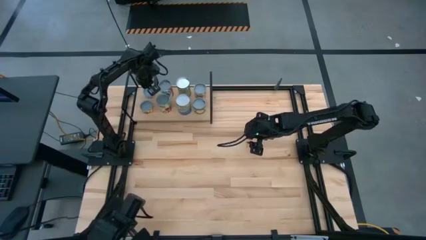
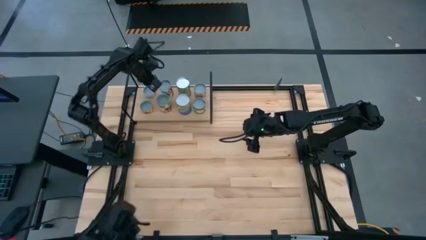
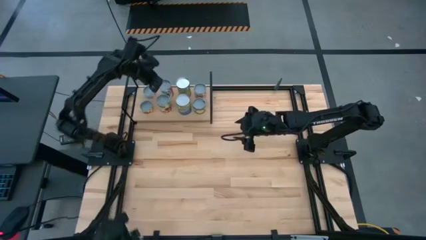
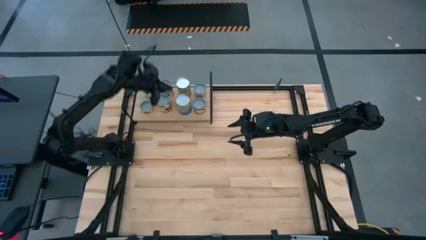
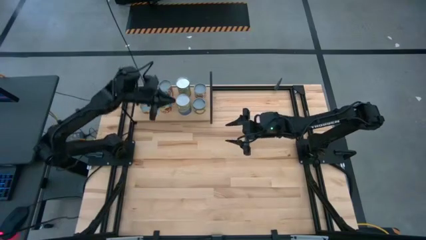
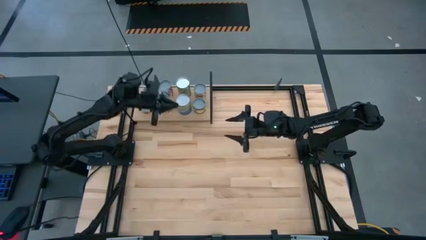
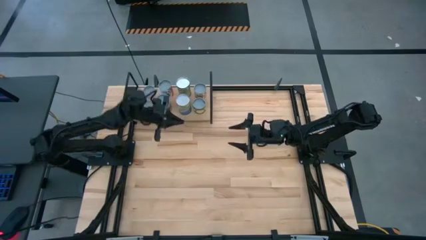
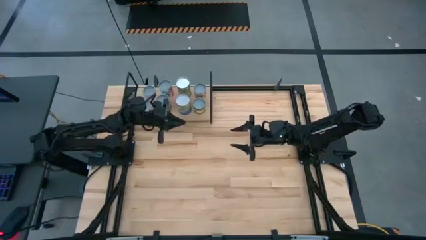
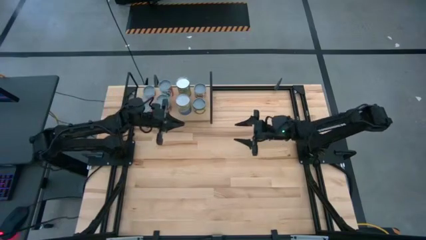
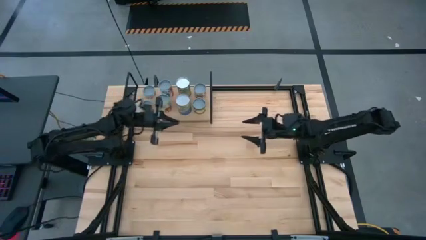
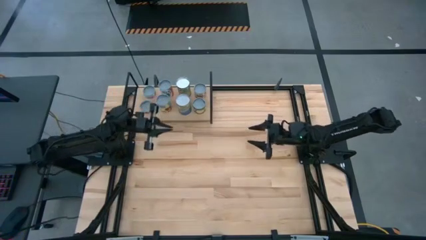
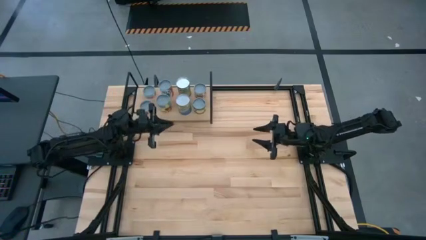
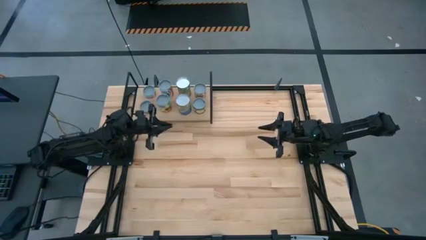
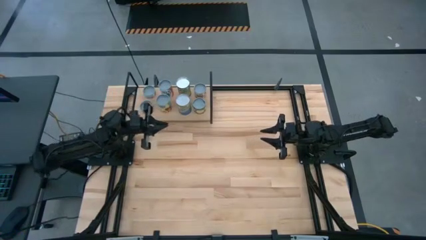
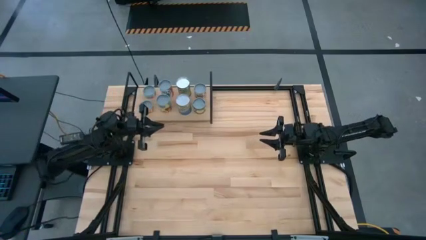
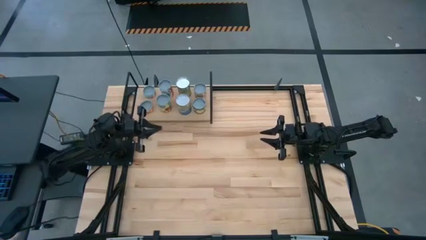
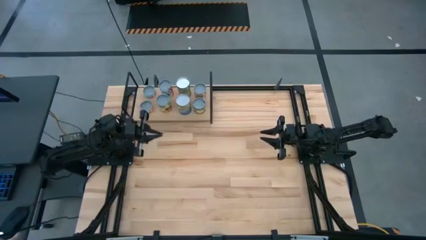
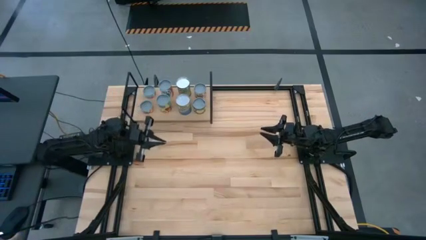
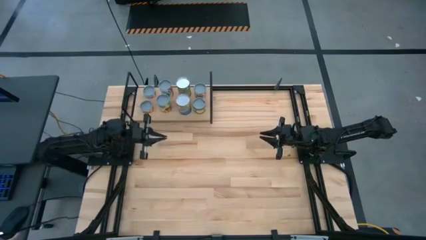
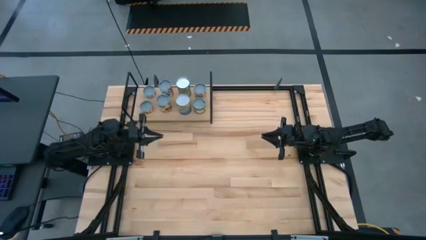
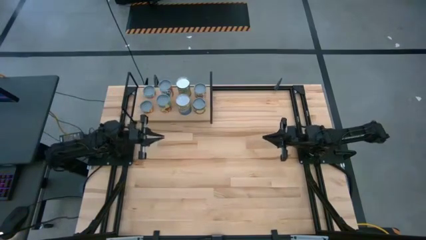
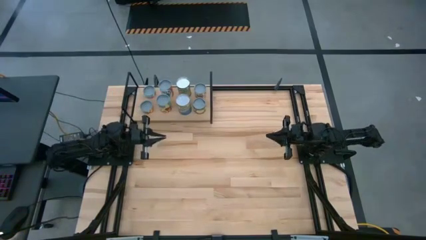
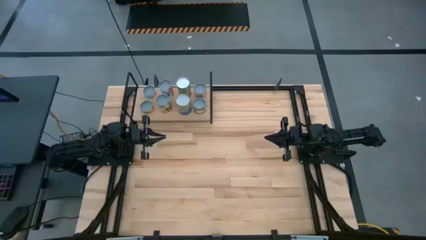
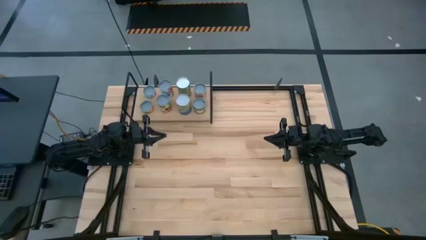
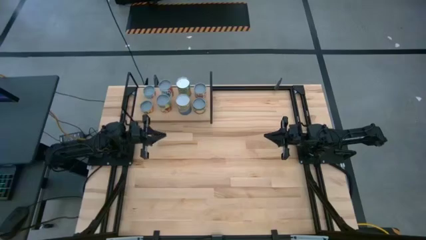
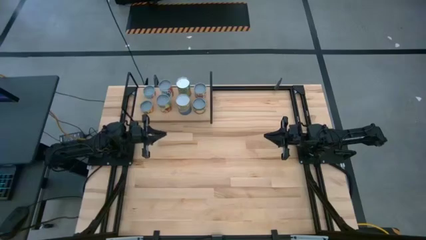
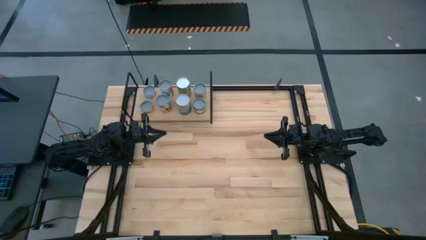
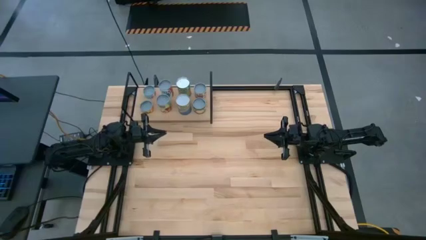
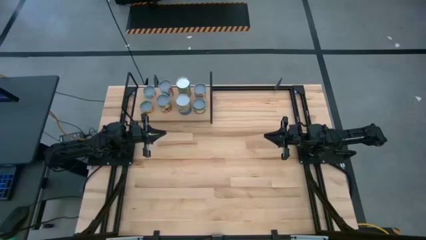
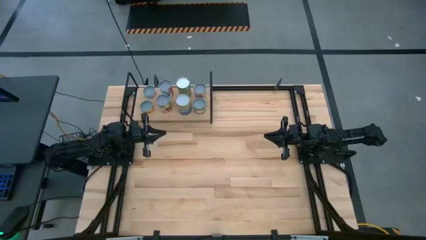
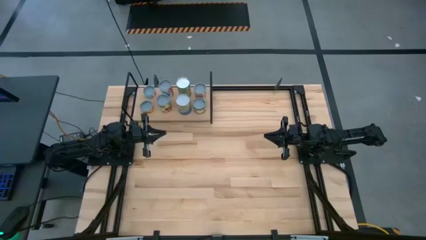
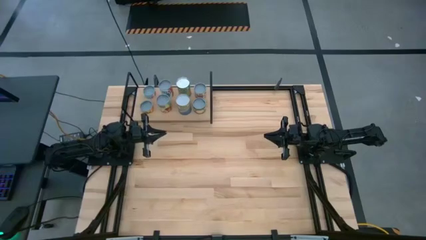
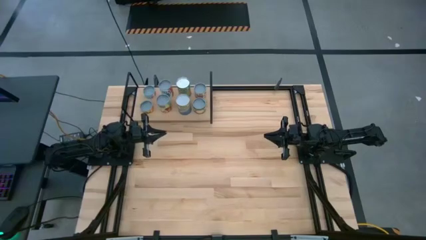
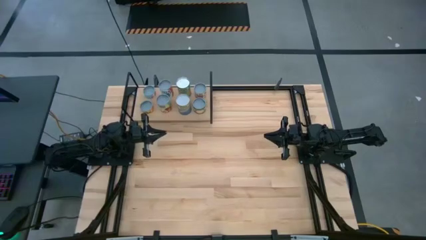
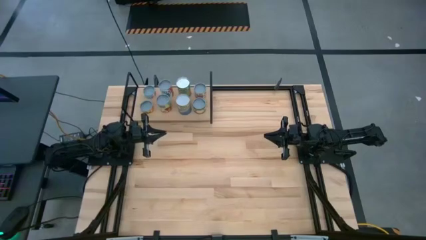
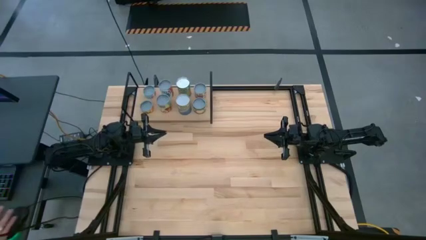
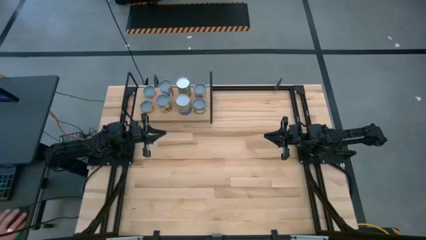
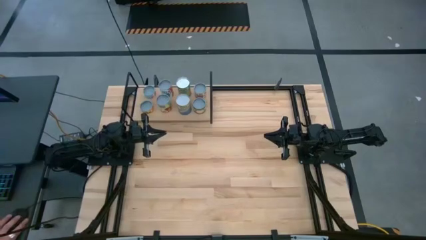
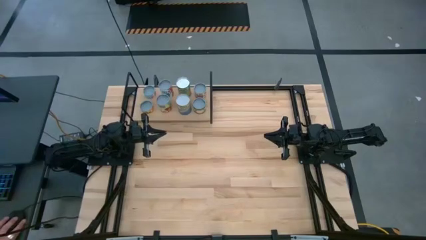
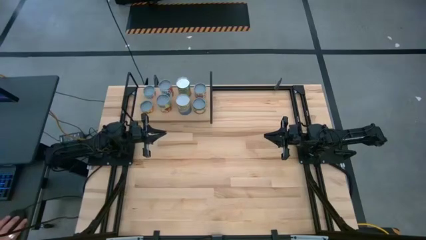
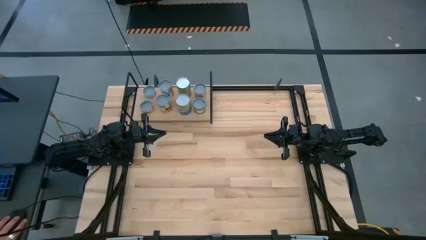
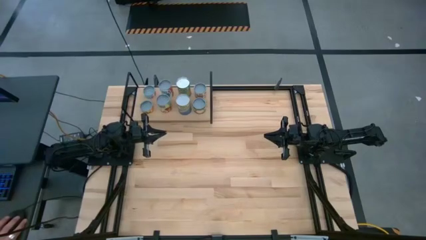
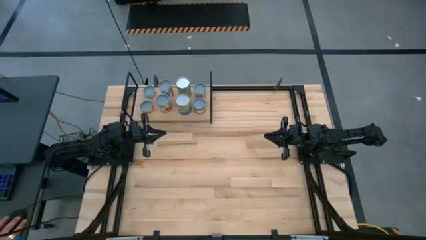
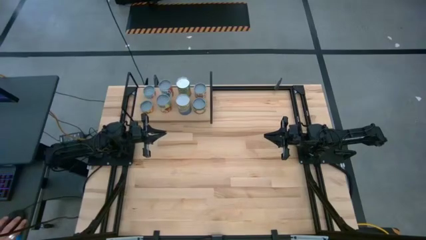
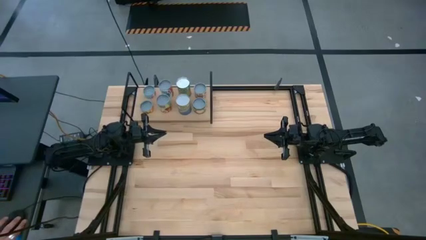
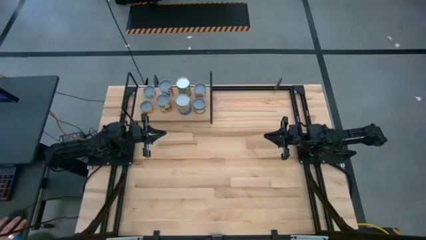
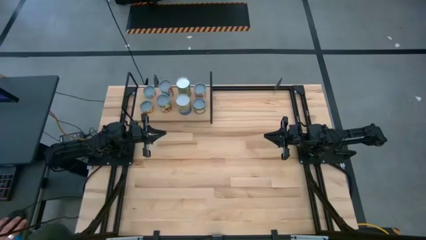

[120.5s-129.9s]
Task: Pick and place cans onto a shelf
Return to Home Position

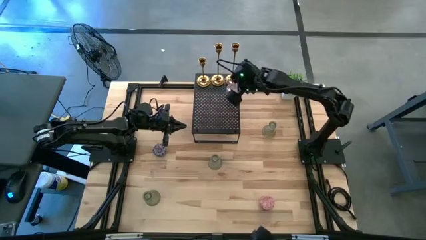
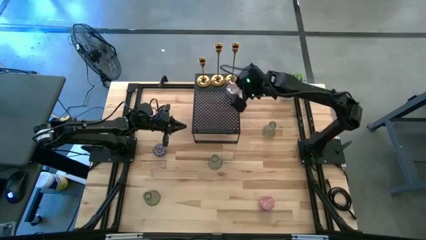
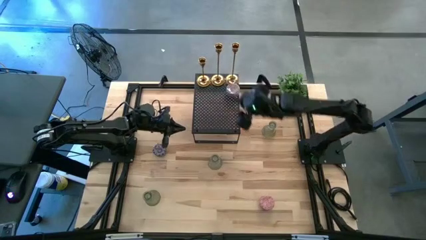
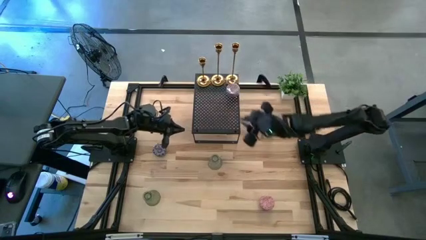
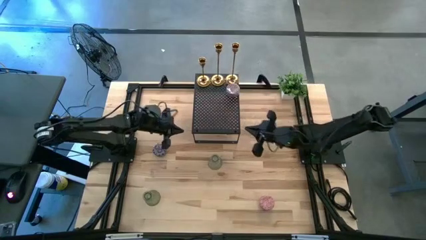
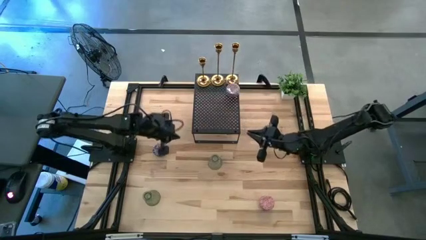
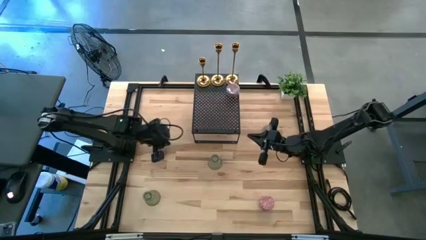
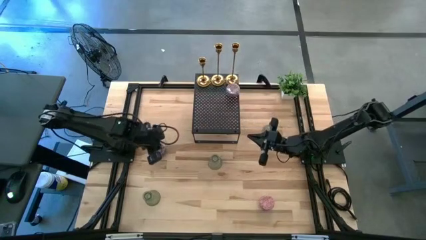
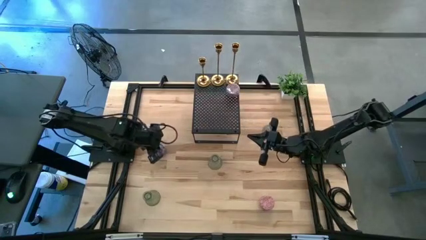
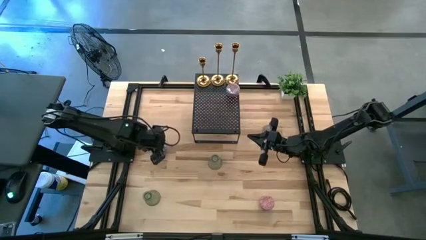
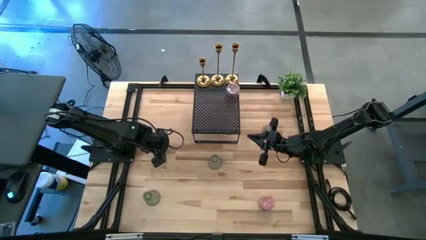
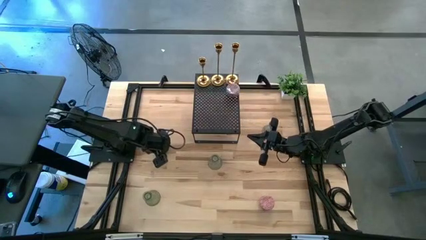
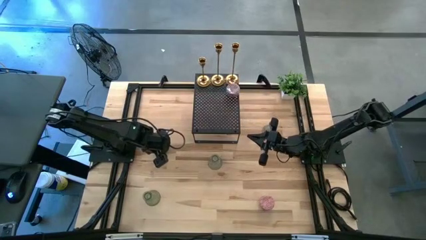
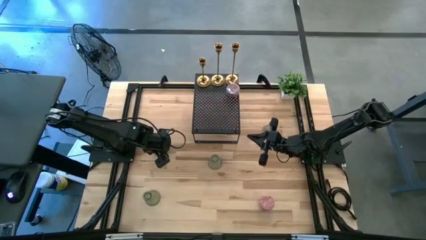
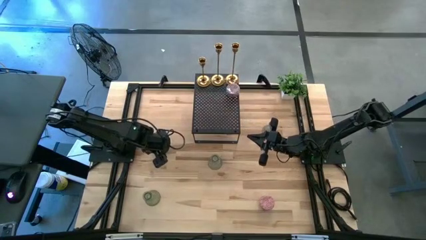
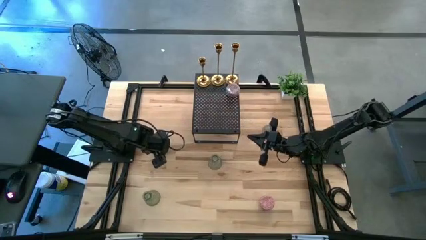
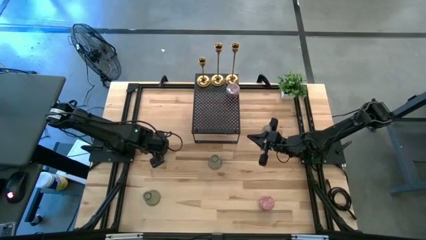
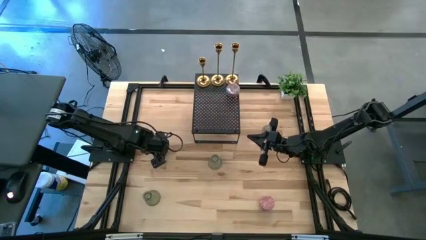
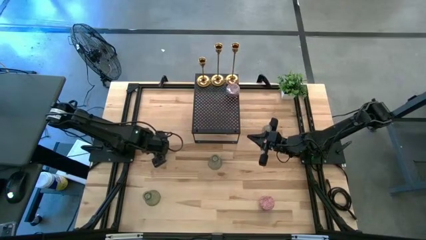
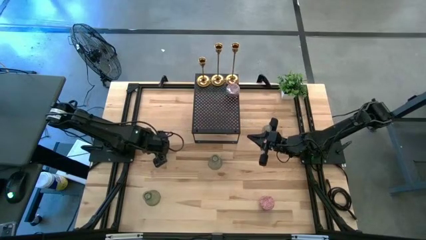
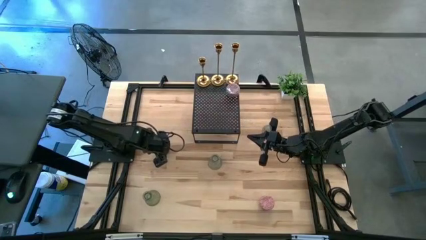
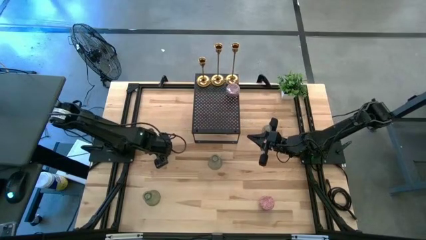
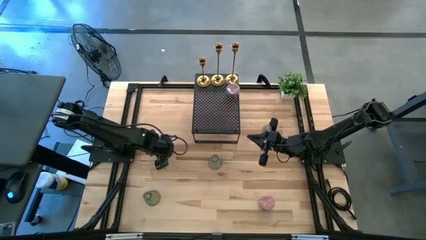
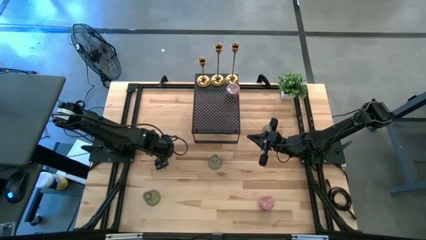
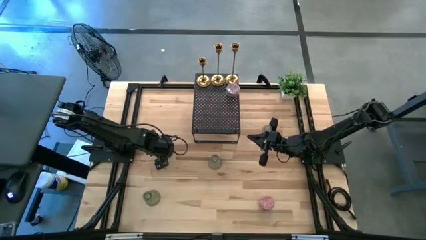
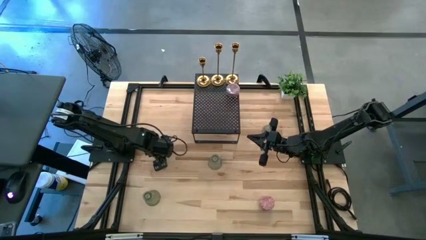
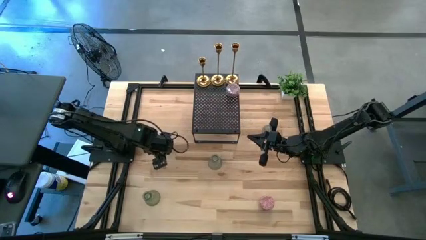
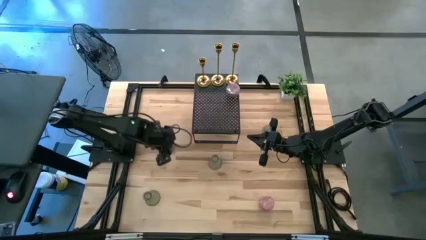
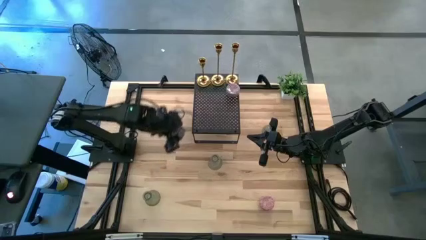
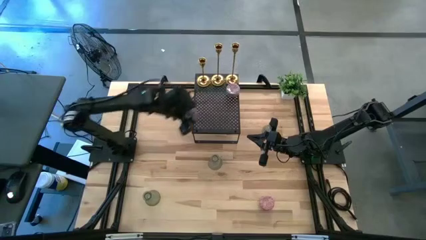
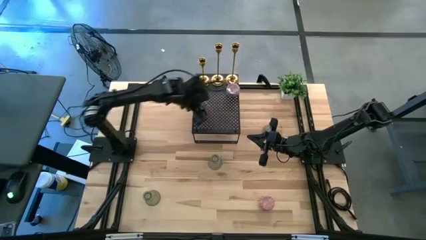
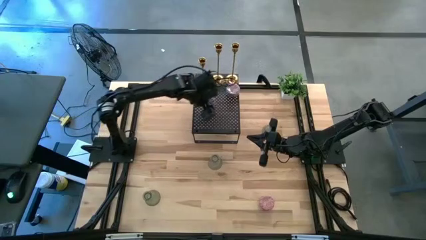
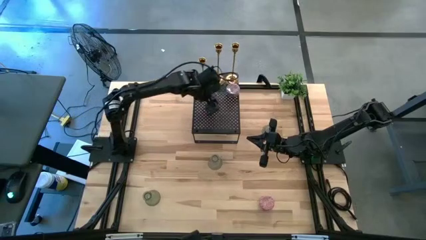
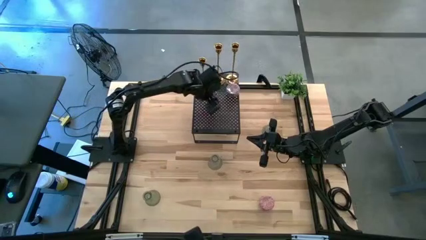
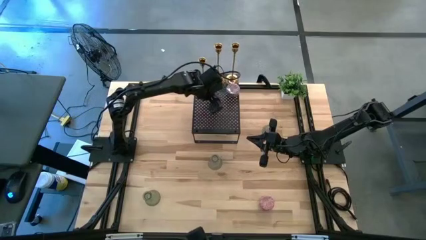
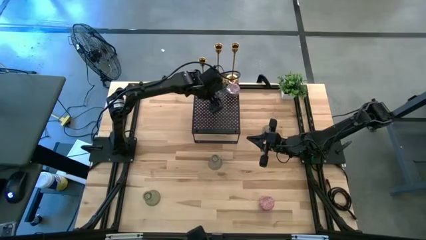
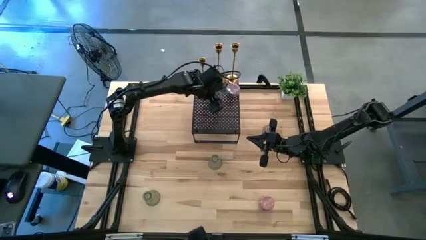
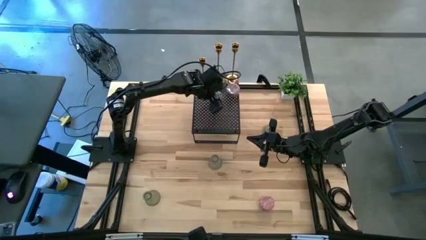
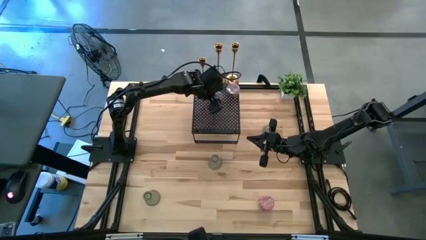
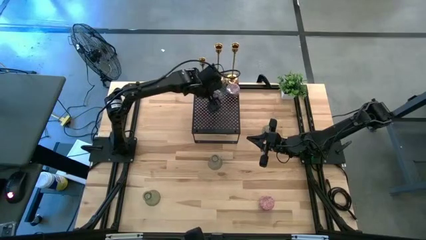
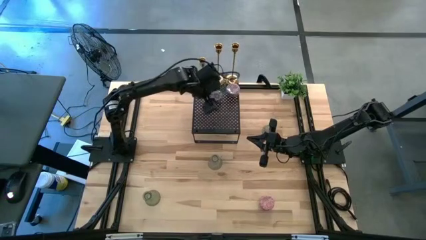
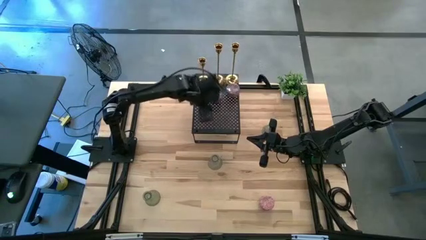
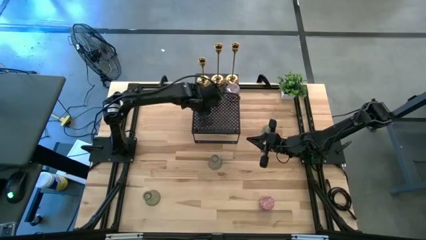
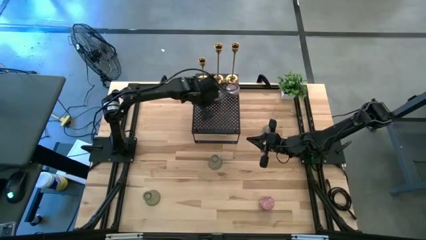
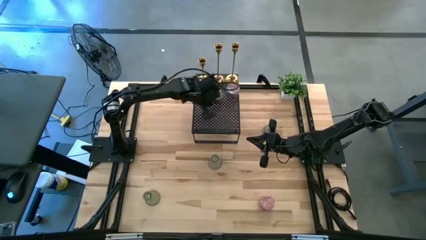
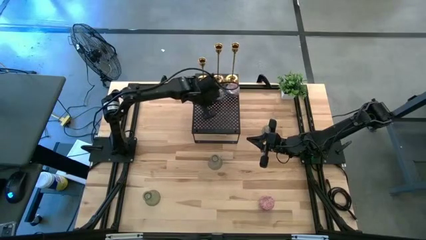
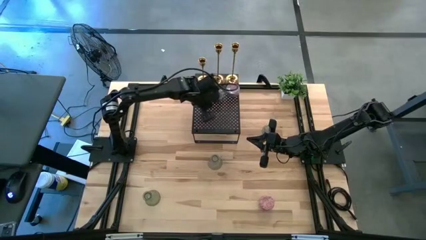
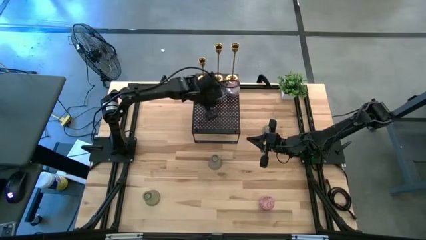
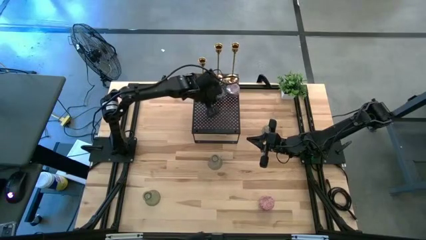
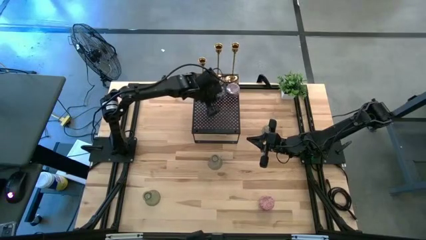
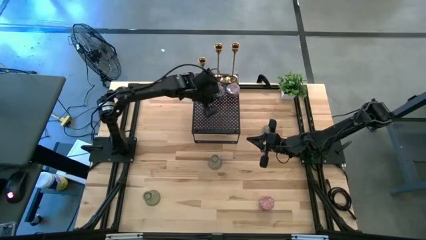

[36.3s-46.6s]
Task: Pick & Place candle stick holders
Put the red black scented candle on the shelf
